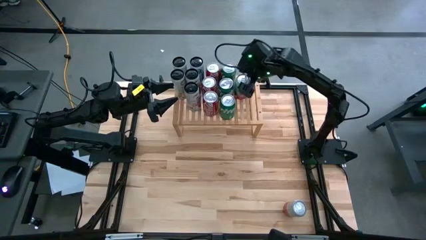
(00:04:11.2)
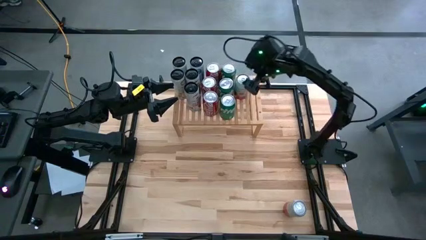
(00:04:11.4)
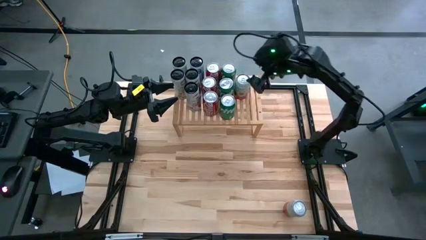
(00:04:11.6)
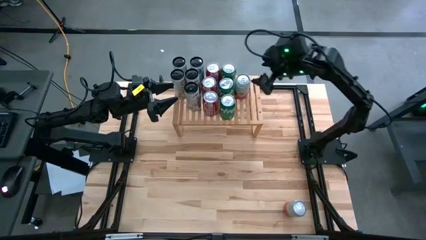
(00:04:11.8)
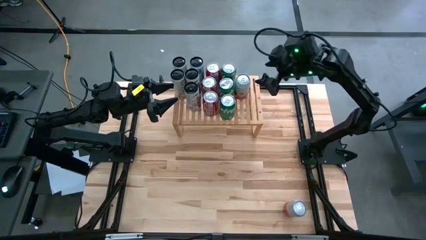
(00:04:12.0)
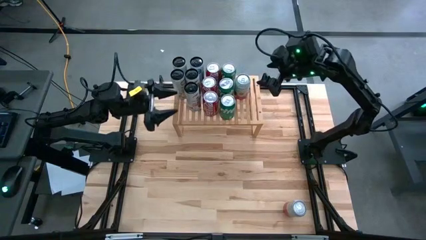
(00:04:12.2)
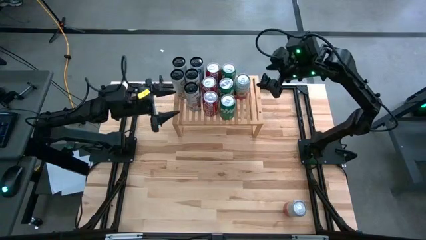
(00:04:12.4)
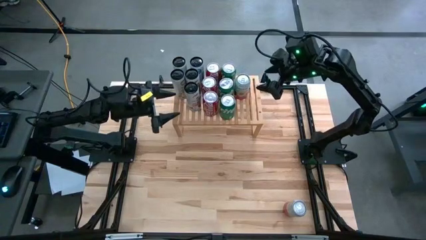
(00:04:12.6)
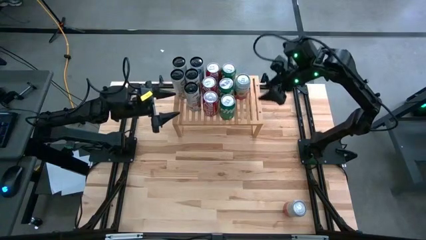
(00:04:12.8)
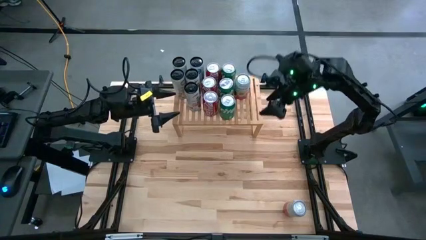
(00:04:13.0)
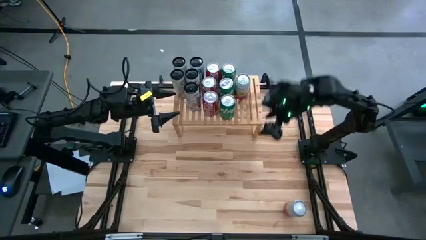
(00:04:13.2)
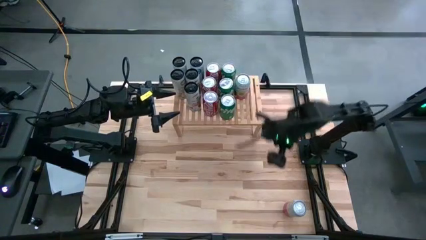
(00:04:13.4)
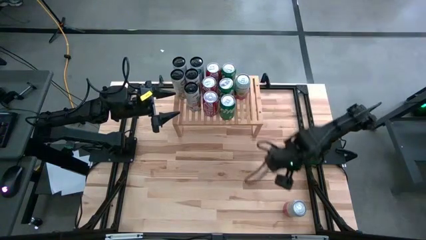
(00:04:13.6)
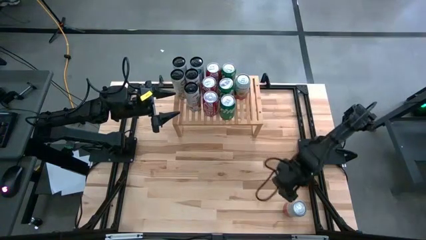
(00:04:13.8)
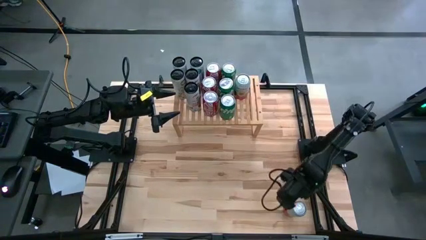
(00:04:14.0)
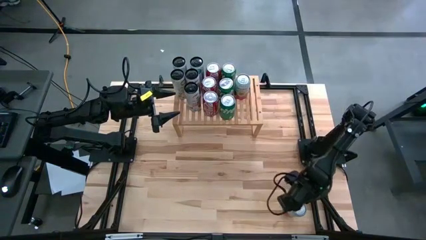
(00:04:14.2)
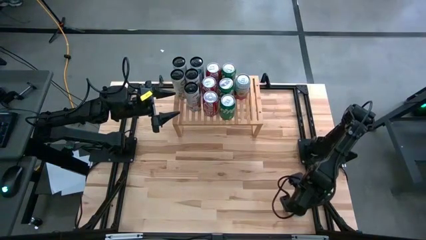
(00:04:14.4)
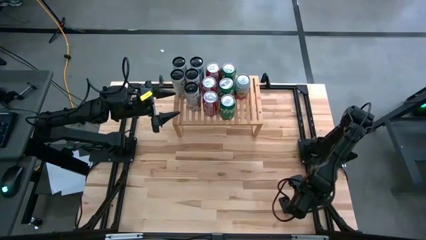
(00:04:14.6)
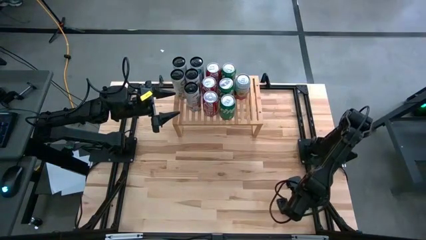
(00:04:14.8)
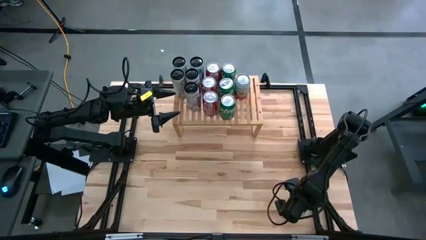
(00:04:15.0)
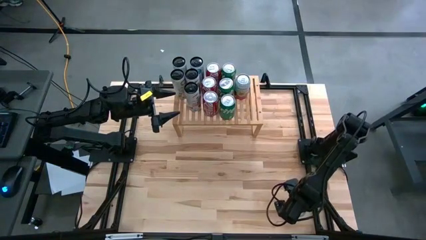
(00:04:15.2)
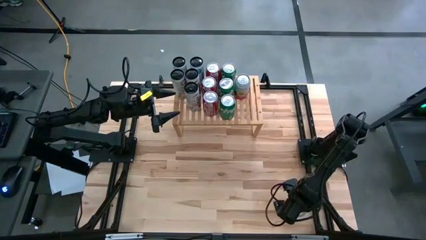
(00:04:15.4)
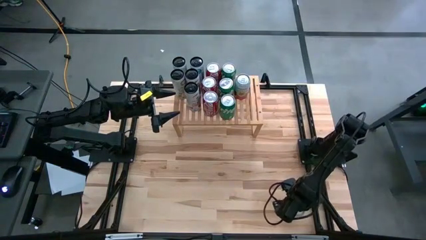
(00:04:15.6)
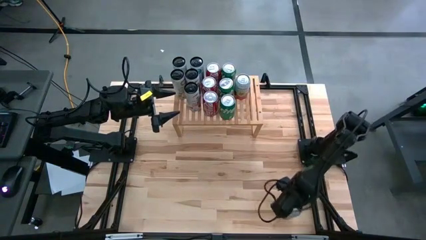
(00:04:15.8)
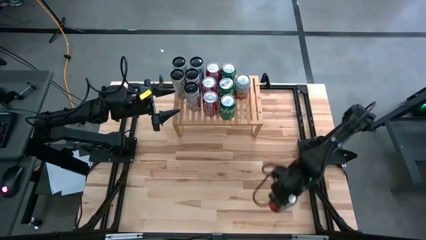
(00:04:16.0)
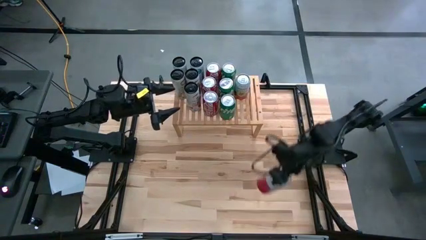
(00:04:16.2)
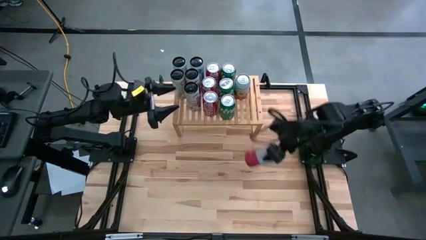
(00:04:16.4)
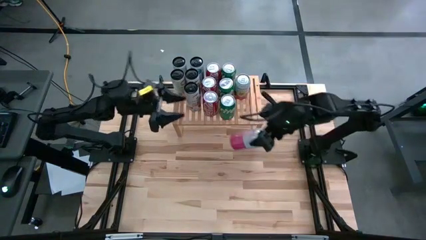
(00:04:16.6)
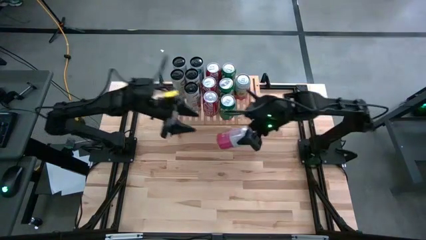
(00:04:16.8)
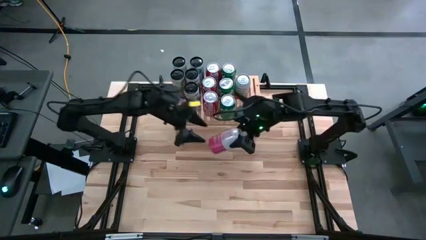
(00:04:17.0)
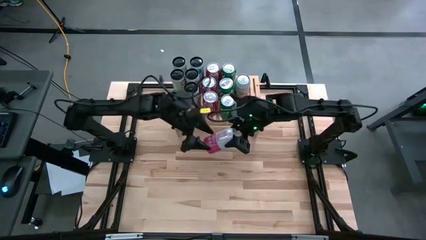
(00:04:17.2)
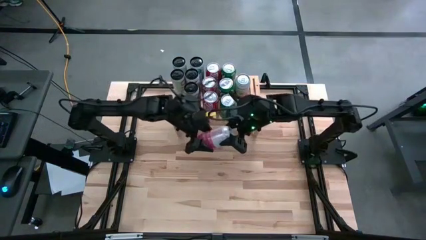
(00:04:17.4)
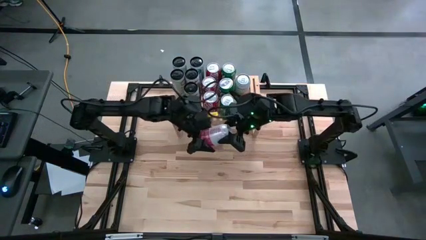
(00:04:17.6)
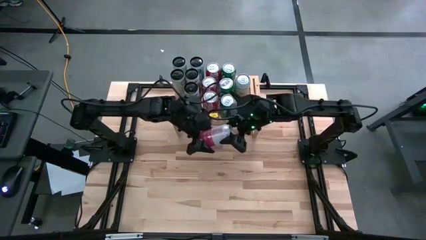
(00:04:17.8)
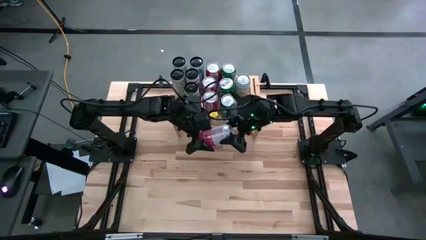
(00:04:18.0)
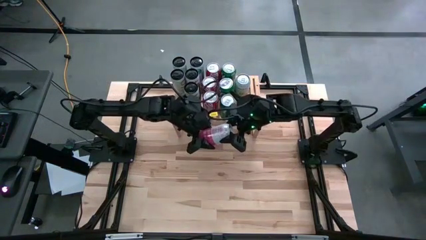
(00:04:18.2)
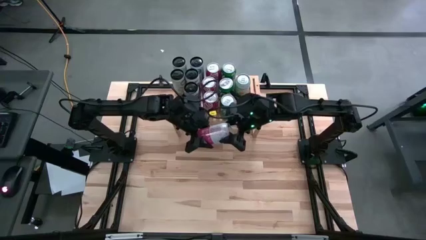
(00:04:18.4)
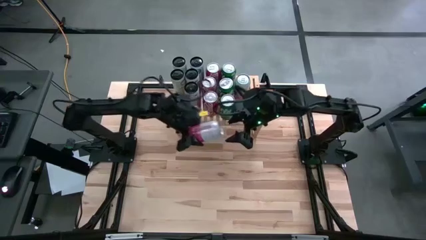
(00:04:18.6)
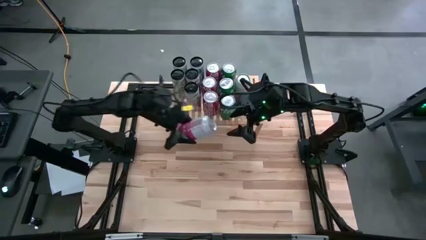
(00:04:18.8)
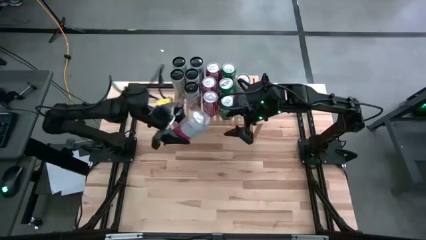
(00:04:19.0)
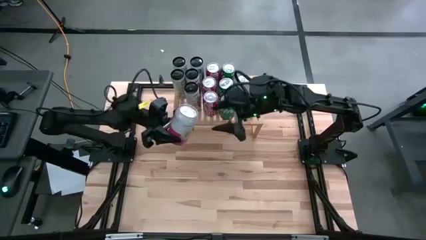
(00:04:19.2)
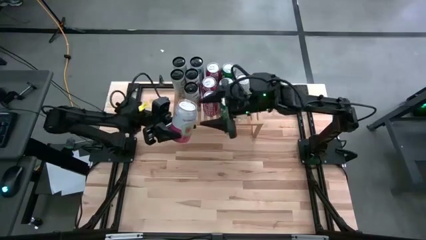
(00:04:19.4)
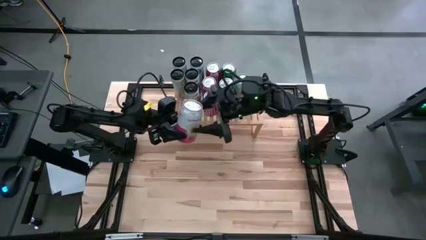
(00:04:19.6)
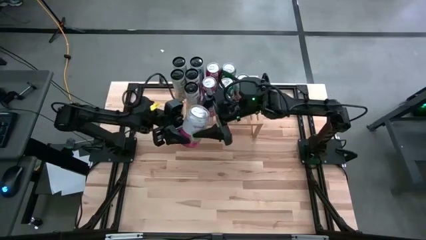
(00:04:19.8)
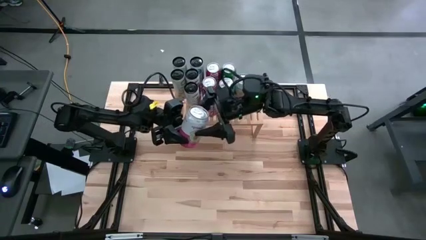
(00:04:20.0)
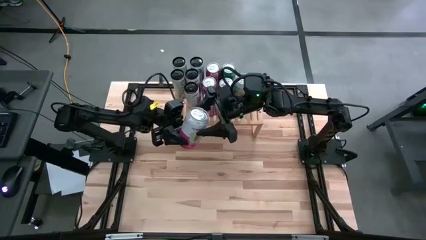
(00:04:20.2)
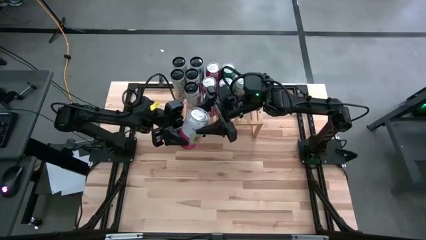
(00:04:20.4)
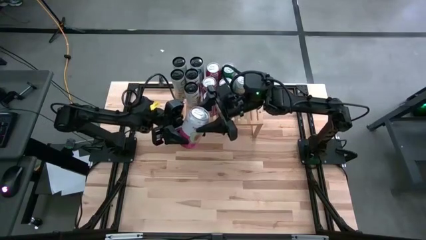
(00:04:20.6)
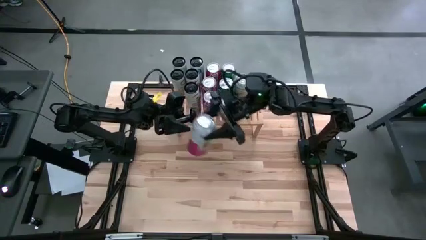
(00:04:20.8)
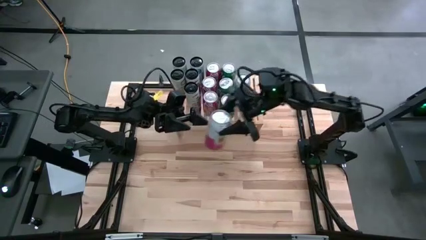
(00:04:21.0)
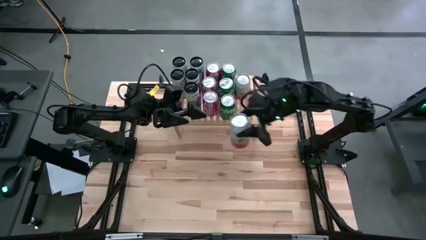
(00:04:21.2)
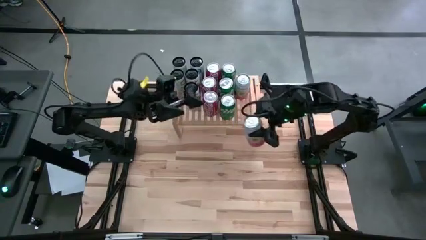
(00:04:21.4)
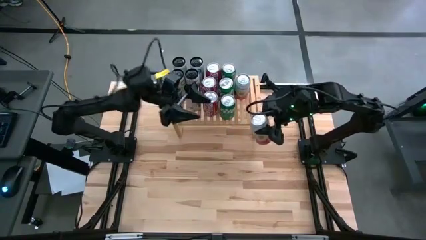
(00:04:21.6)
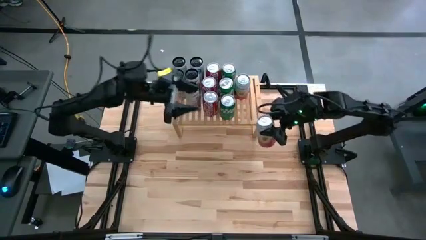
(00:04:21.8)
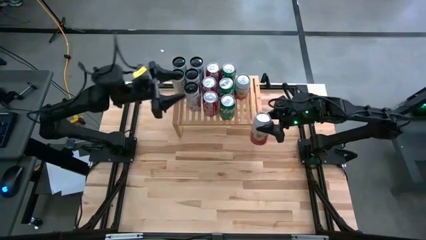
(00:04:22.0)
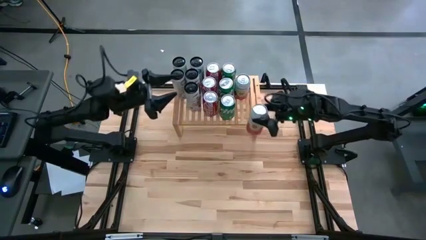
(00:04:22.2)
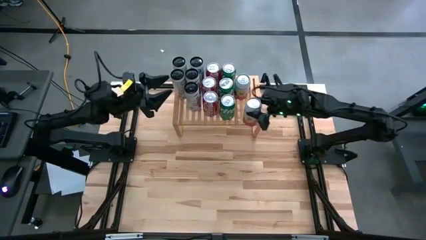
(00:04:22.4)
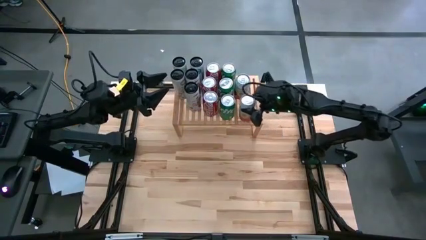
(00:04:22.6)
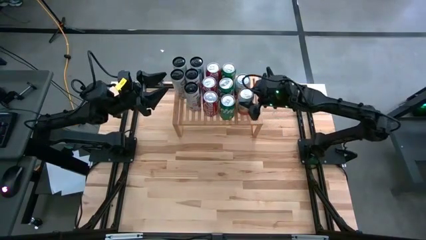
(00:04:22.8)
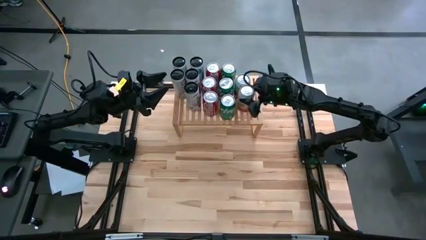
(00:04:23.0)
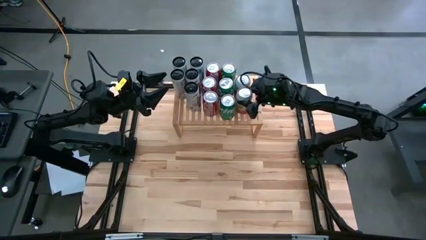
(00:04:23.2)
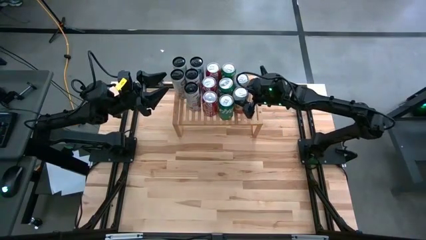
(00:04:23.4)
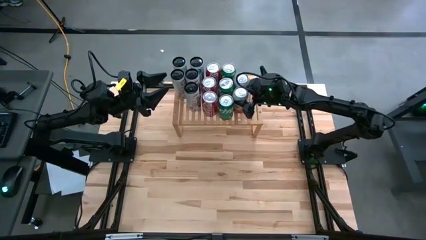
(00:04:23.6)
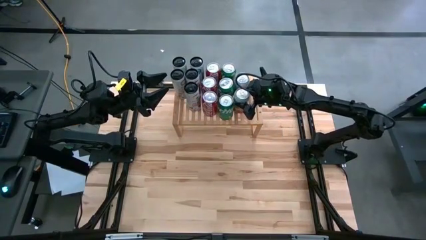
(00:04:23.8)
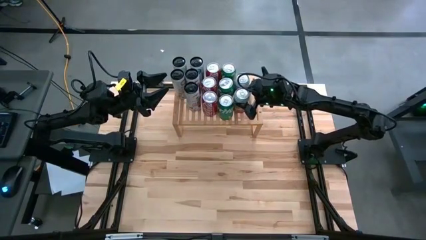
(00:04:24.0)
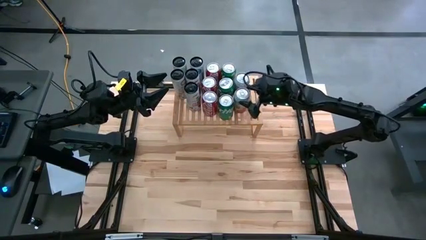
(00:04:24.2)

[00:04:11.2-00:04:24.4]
Task: Place canned beverage on shelf
Put the pink white soda can on the shelf aligned with other pink white soda can
